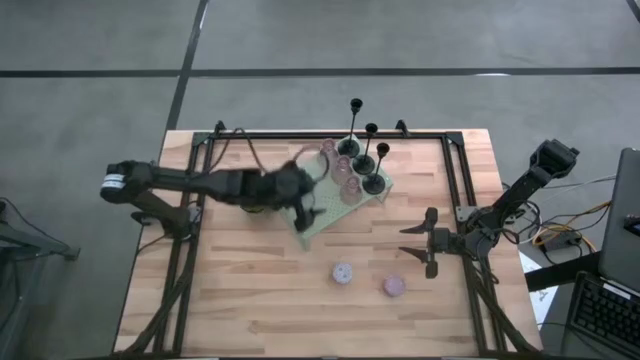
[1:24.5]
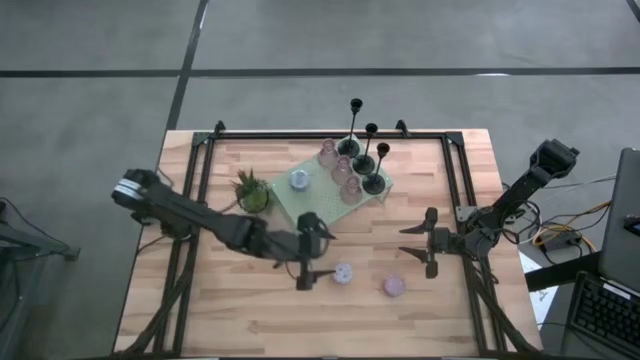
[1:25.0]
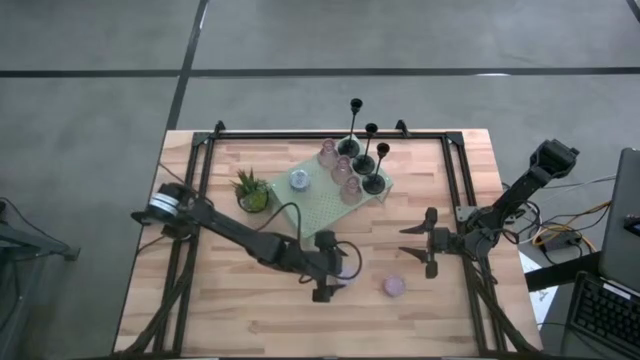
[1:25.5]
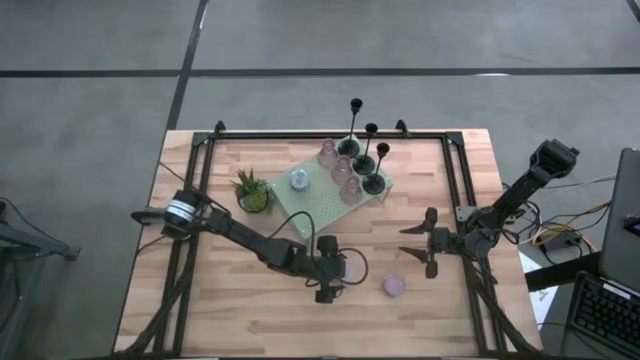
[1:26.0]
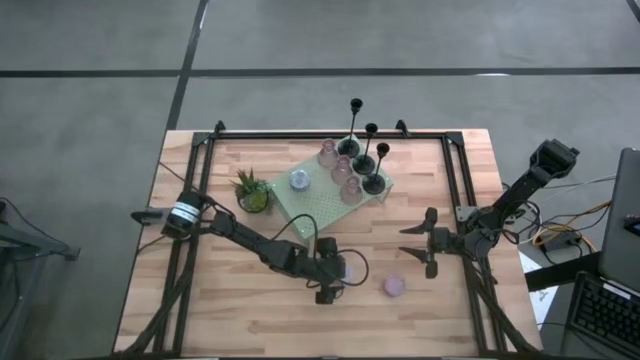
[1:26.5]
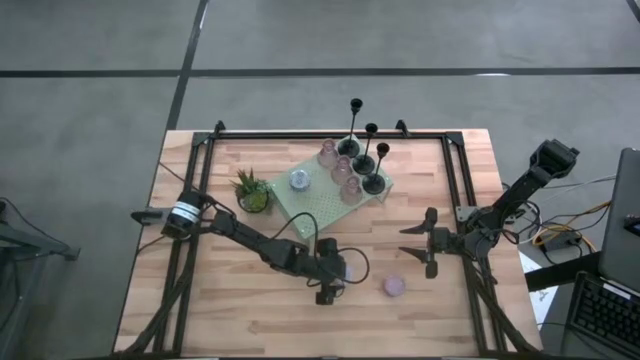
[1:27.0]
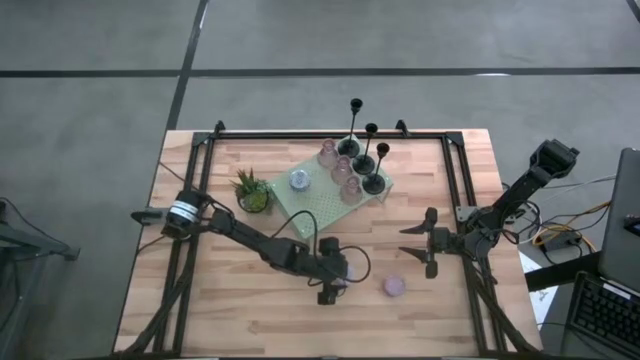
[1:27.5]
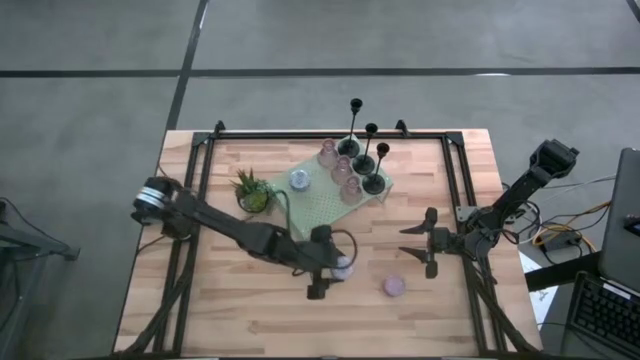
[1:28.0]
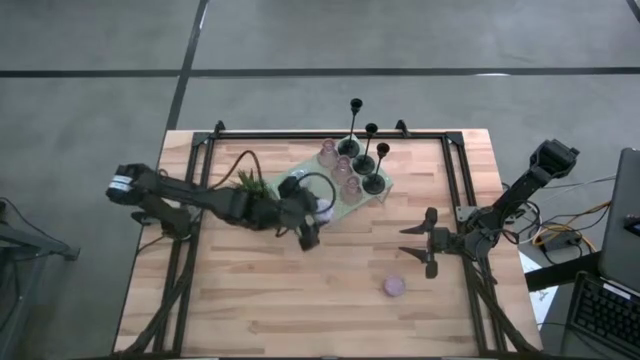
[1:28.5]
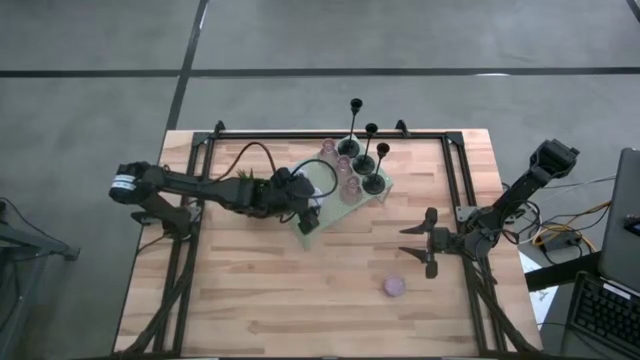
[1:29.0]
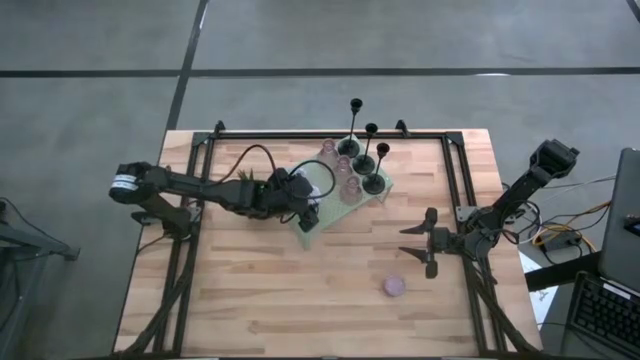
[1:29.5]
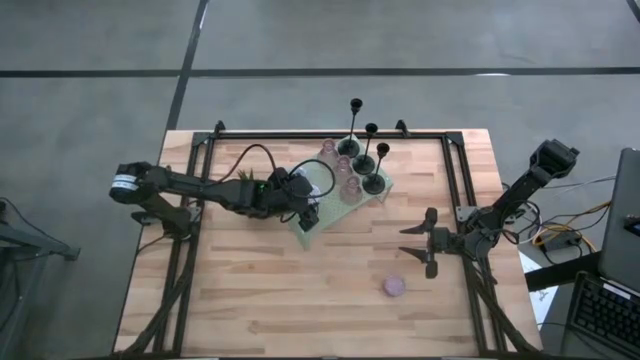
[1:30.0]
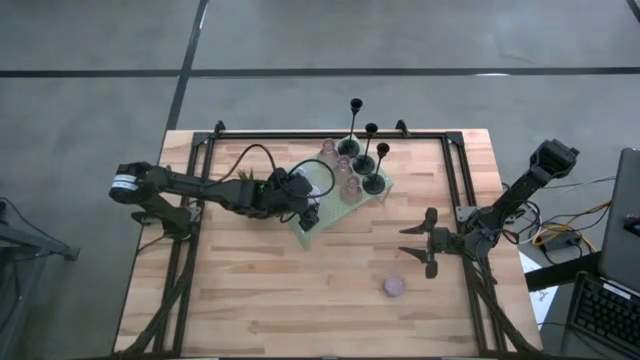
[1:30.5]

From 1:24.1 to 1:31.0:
Task: Pick & Place candle stick holders
Put the red scented candle on the shelf aligned with the other scented candle

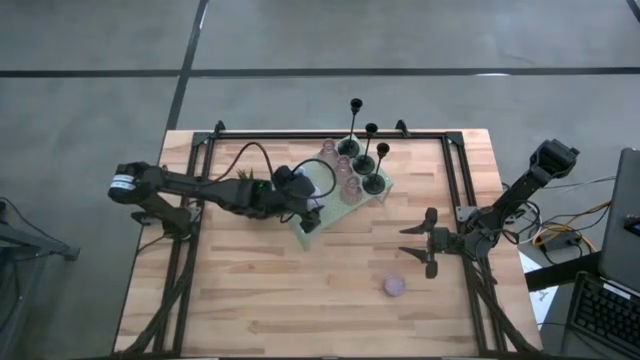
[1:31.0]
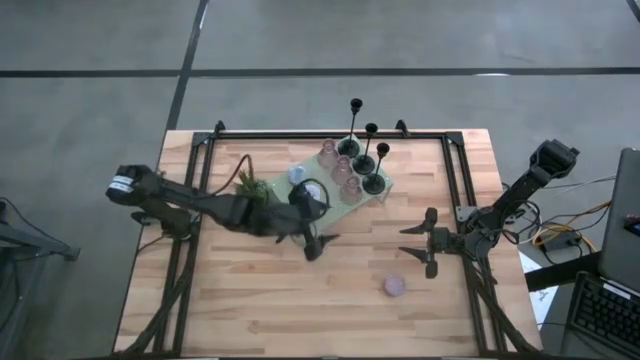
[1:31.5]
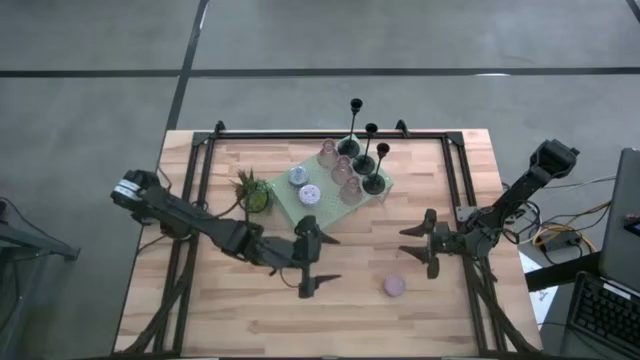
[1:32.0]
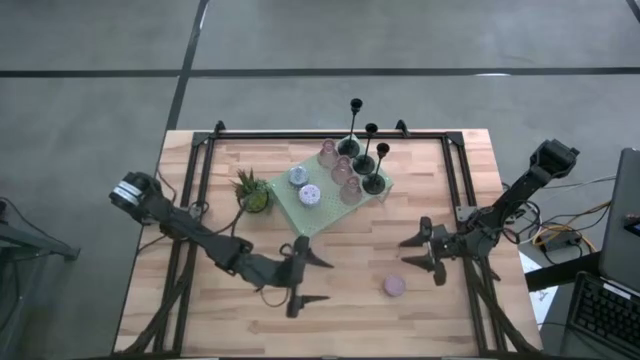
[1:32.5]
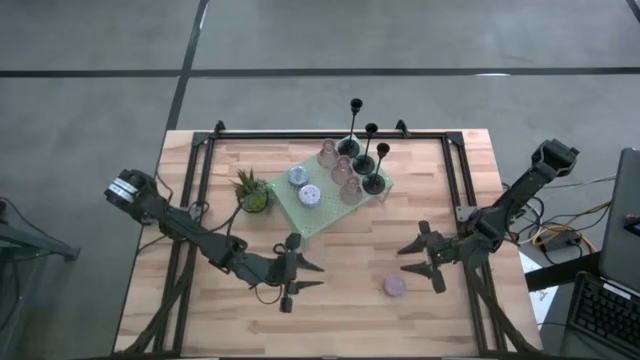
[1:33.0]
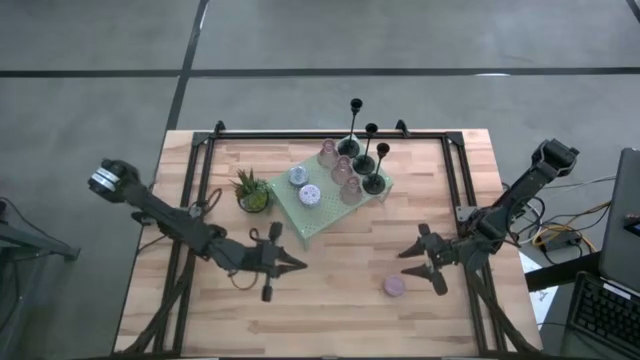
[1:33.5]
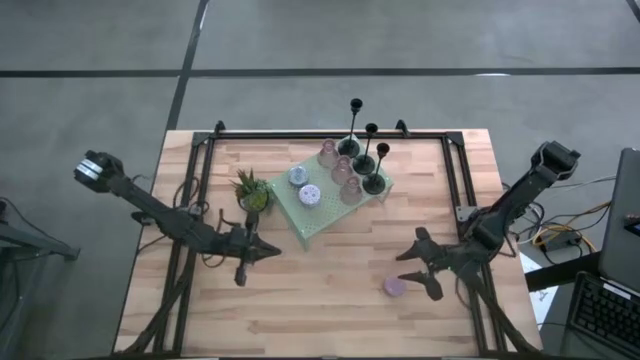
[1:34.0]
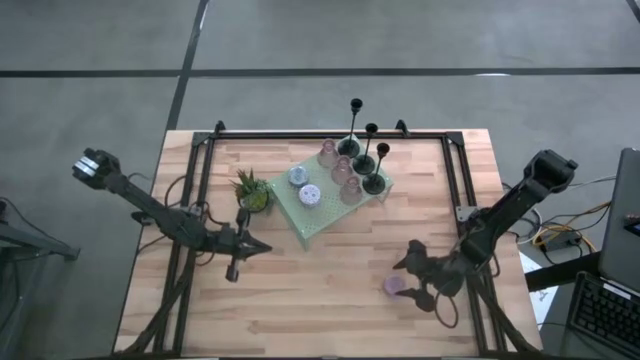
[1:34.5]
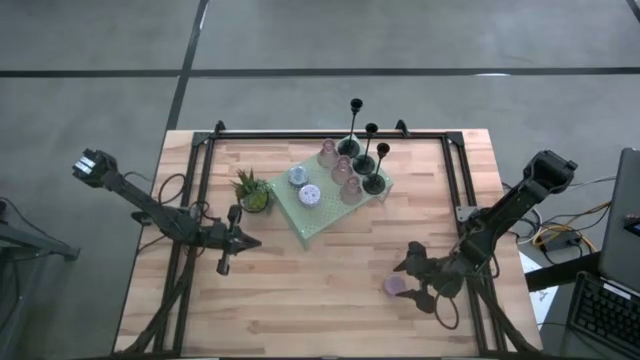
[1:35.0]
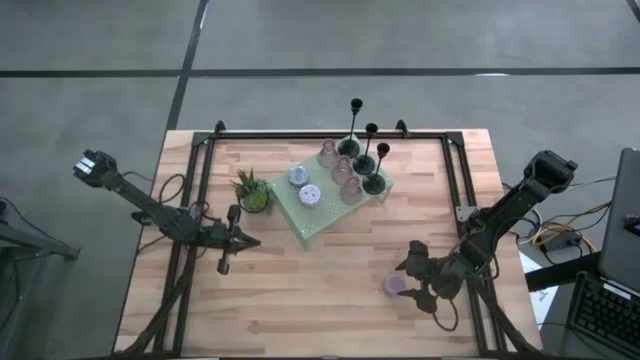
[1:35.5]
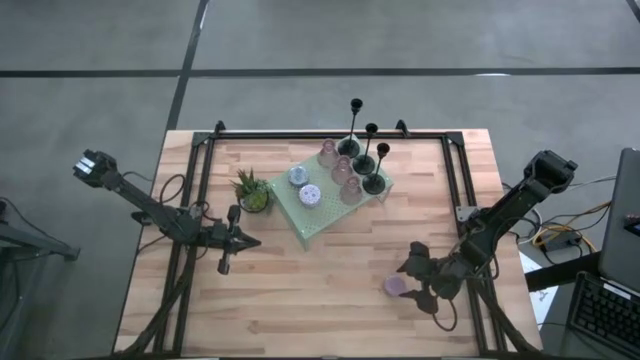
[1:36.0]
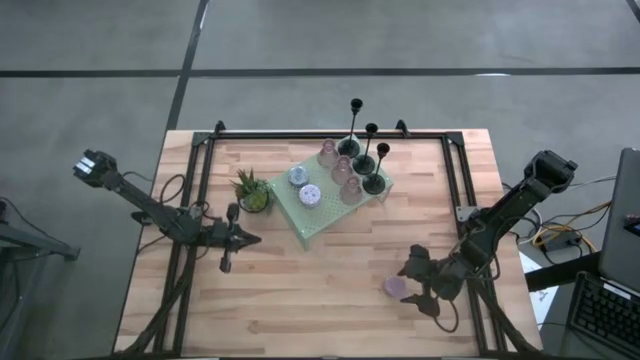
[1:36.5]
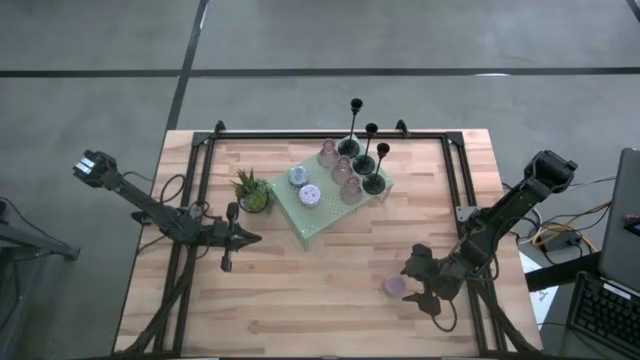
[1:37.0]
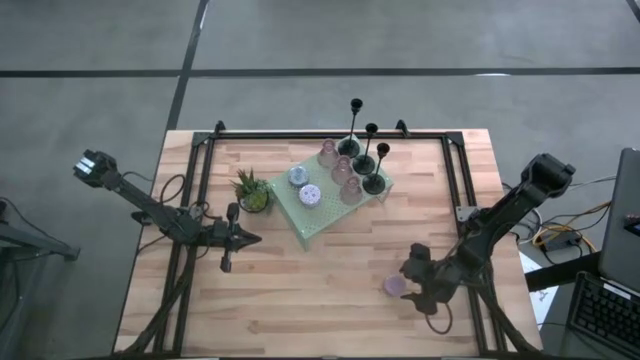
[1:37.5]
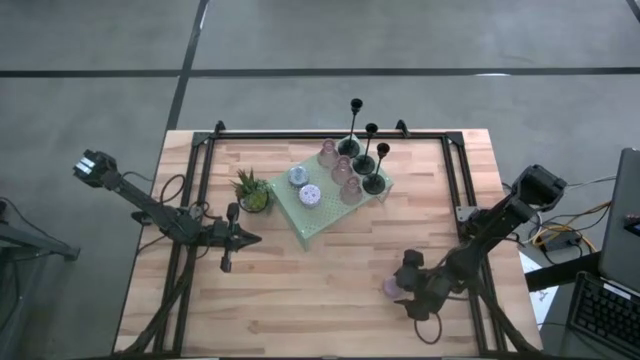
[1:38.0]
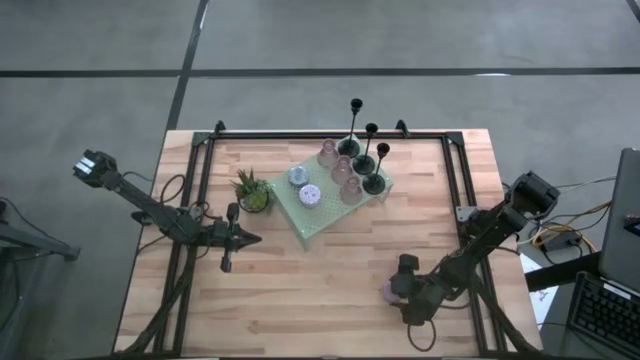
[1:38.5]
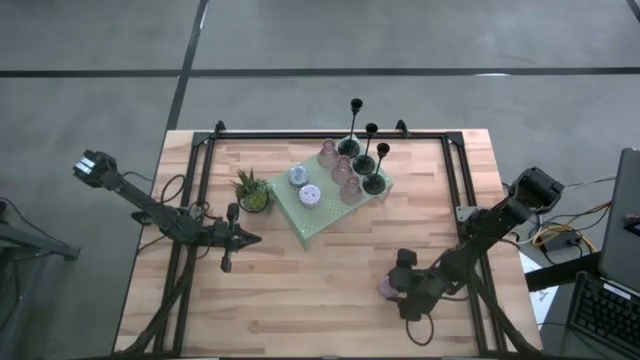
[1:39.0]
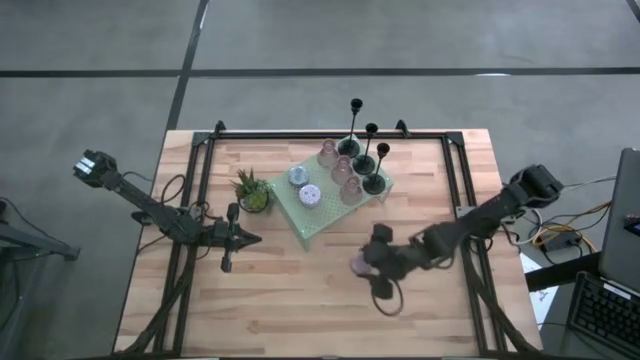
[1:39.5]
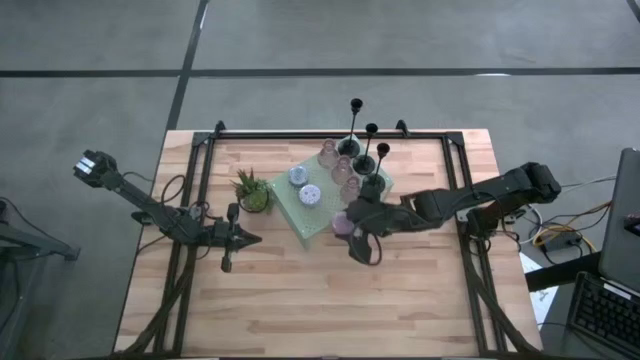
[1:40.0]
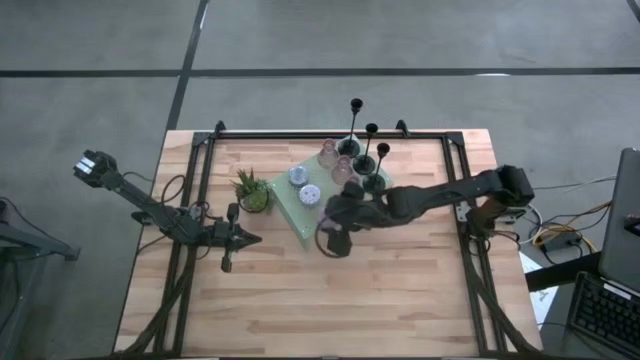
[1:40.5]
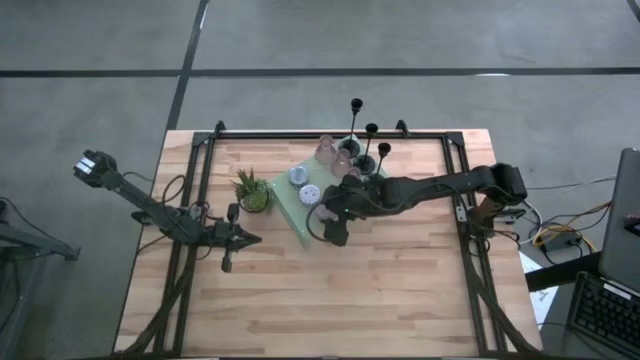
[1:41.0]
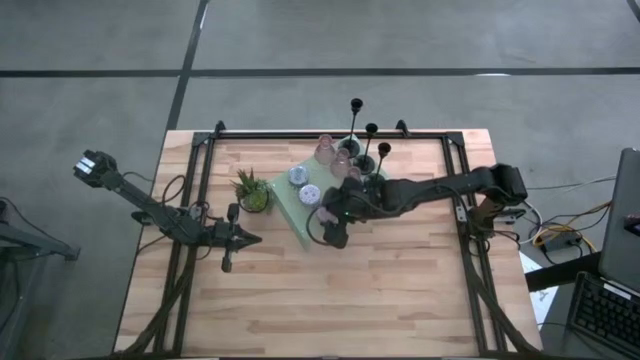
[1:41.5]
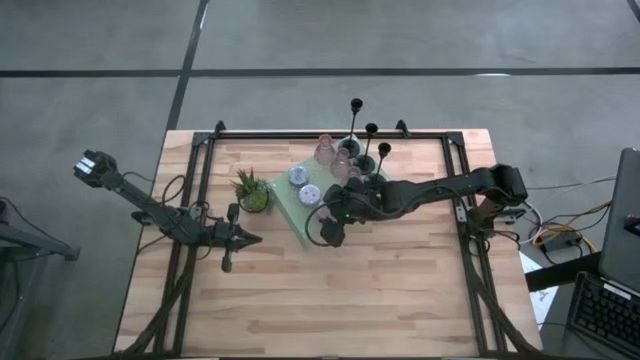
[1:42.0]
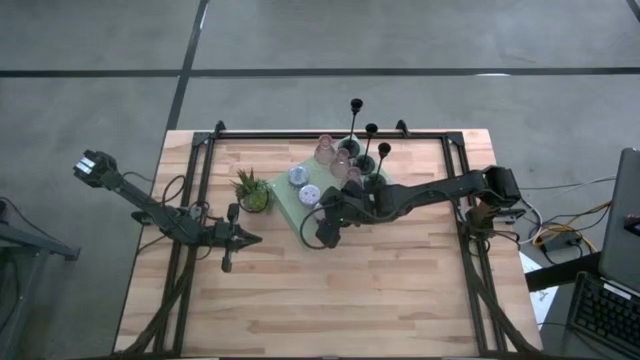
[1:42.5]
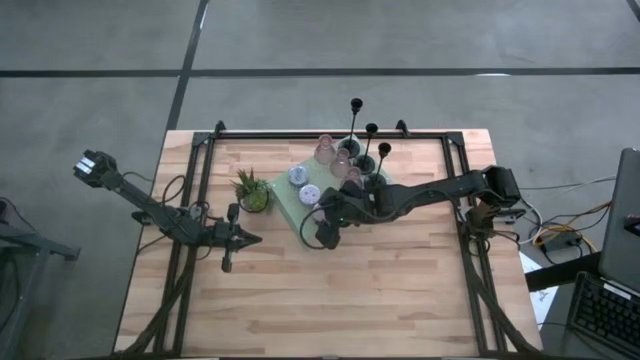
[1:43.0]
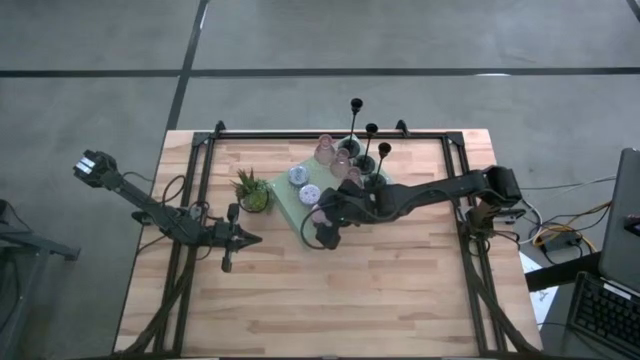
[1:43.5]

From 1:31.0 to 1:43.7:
Put the pink scented candle on the shelf aligned with the other scented candles

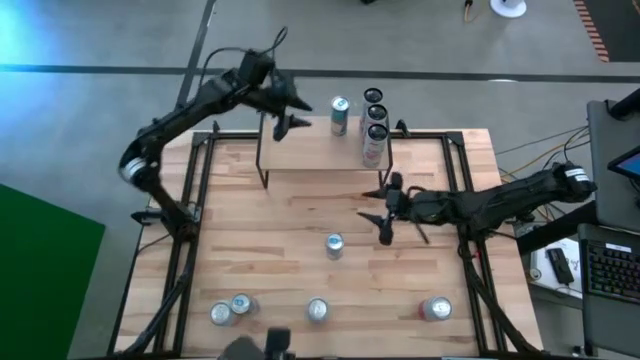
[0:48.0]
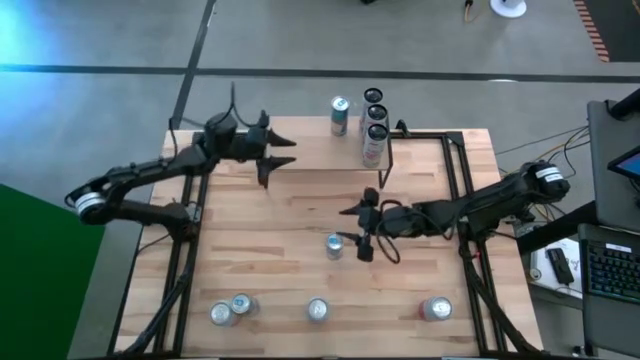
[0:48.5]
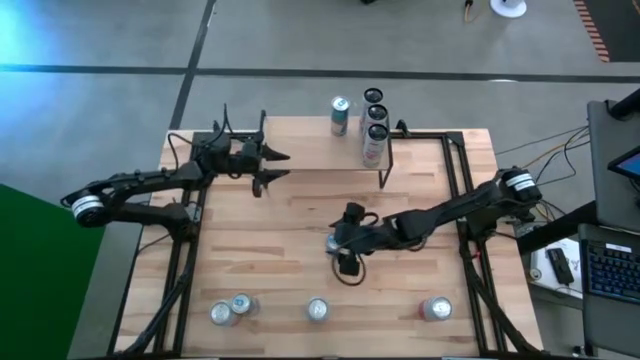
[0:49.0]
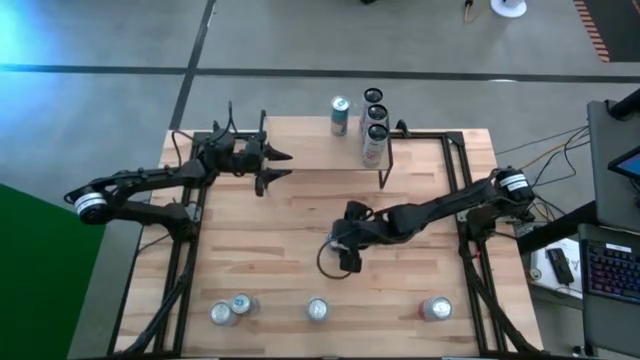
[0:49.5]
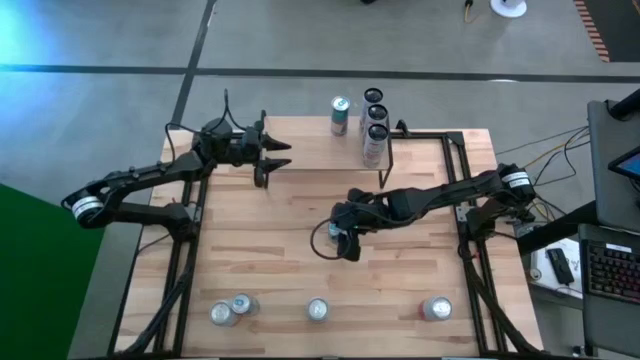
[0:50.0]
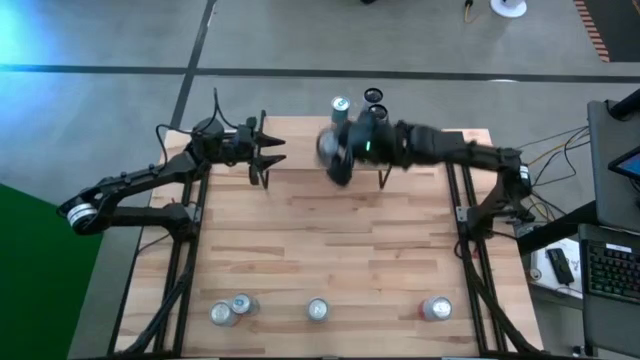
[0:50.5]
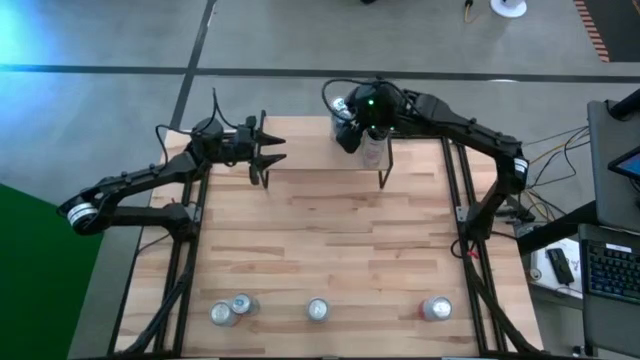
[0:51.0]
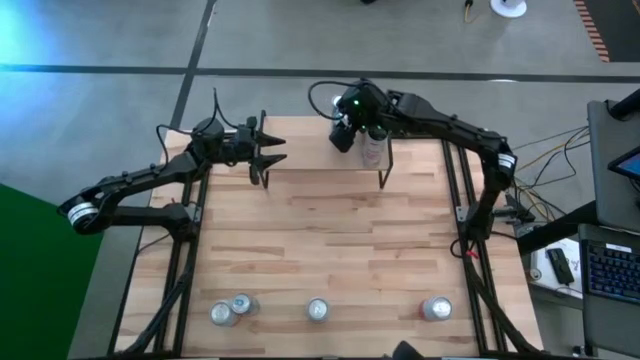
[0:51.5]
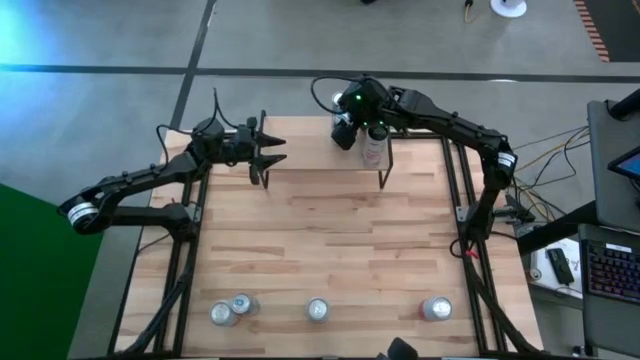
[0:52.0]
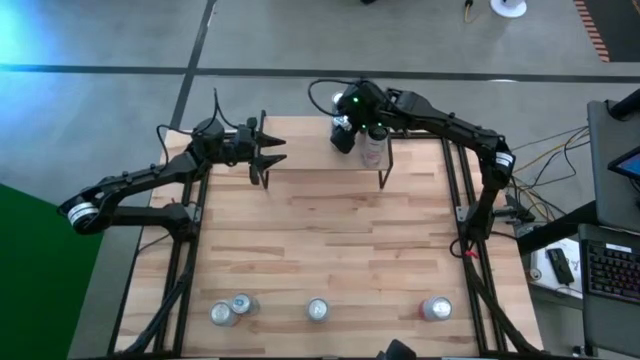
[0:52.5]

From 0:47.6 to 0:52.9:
Task: Place canned beverage on shelf
Put the top blue and silver soda can on the shelf aligned with the other blue soda can
